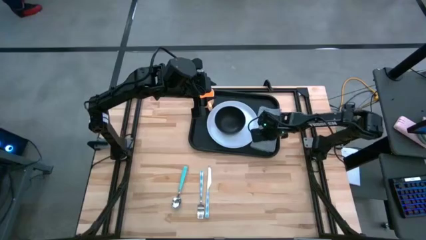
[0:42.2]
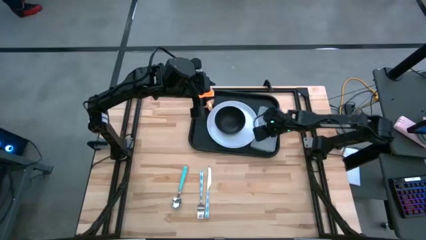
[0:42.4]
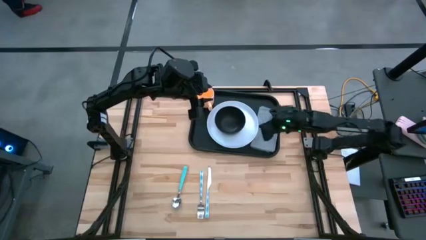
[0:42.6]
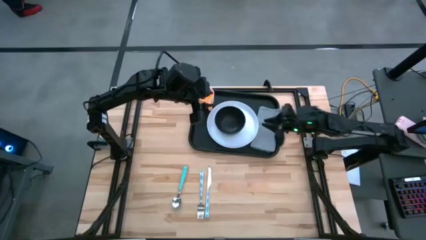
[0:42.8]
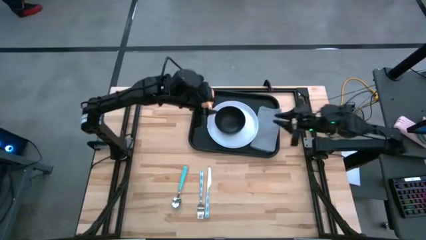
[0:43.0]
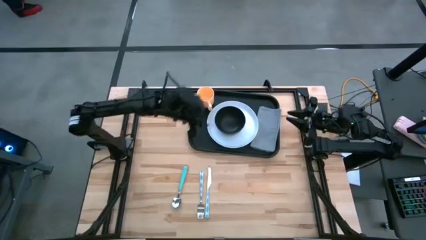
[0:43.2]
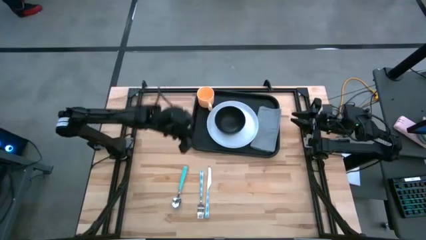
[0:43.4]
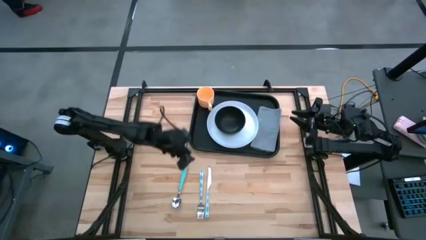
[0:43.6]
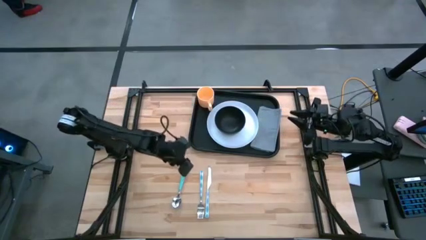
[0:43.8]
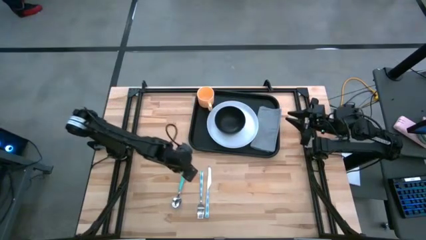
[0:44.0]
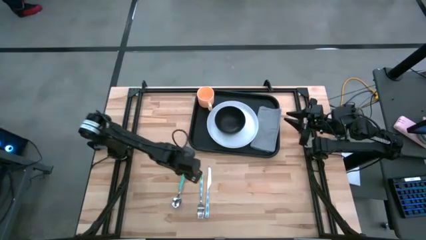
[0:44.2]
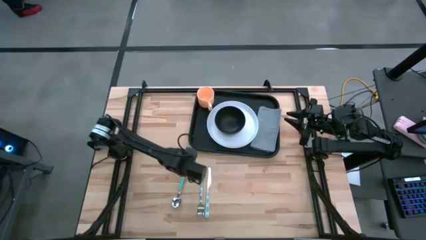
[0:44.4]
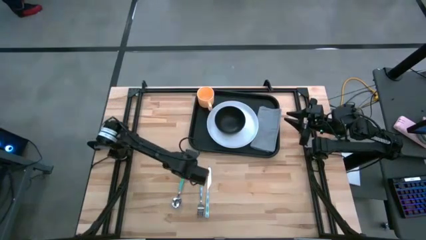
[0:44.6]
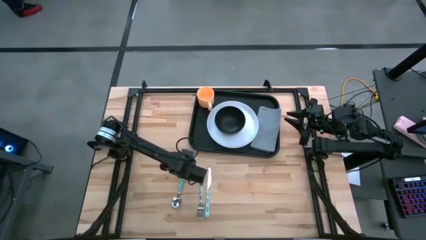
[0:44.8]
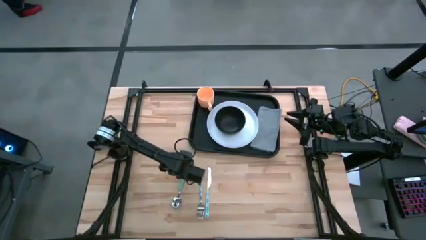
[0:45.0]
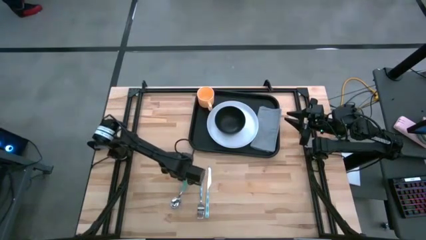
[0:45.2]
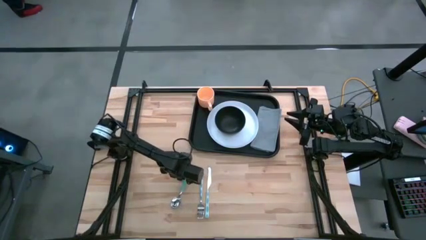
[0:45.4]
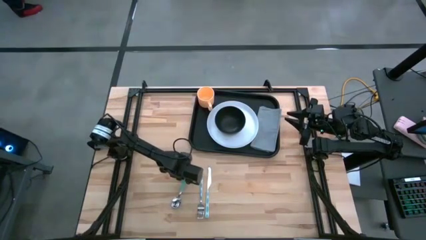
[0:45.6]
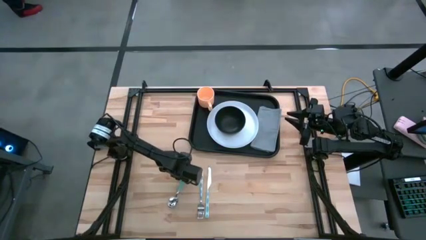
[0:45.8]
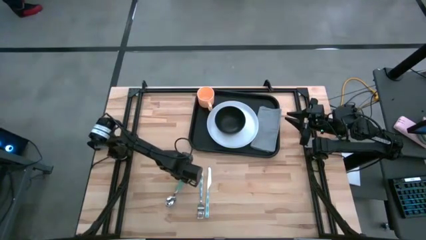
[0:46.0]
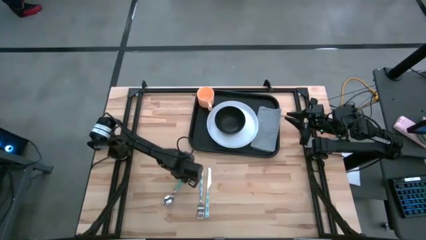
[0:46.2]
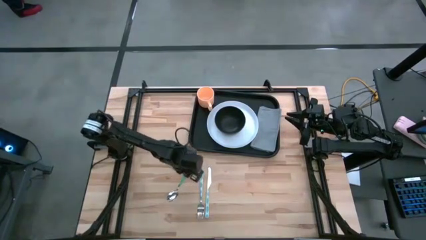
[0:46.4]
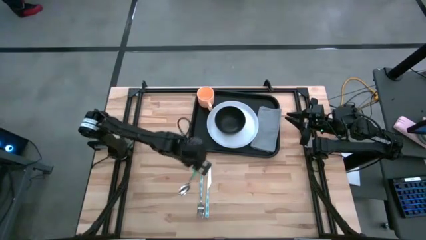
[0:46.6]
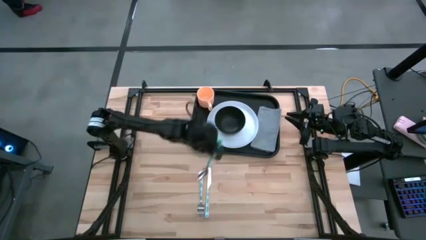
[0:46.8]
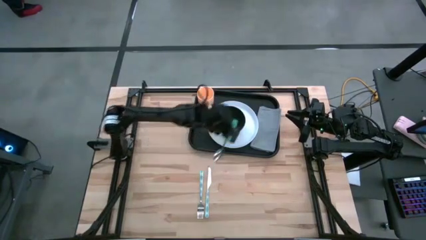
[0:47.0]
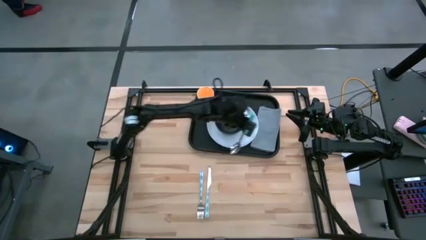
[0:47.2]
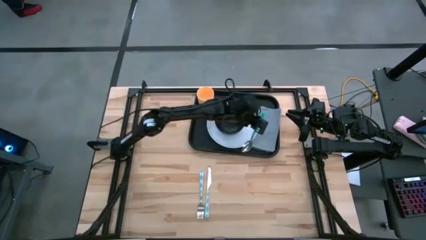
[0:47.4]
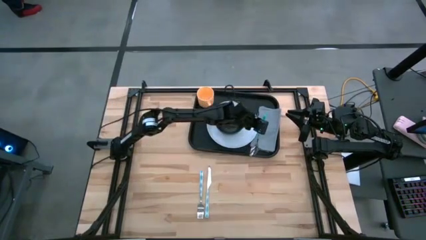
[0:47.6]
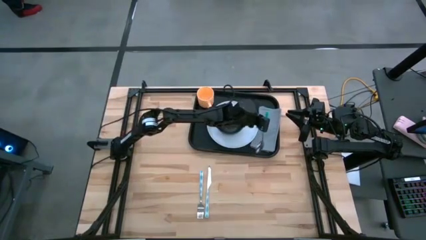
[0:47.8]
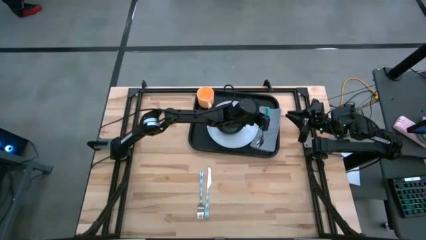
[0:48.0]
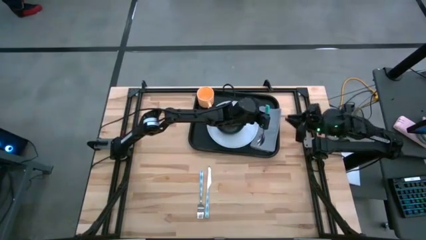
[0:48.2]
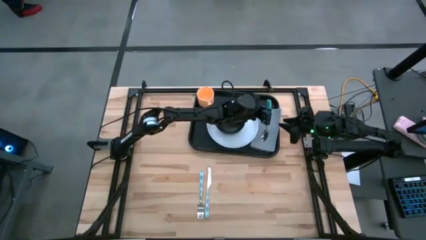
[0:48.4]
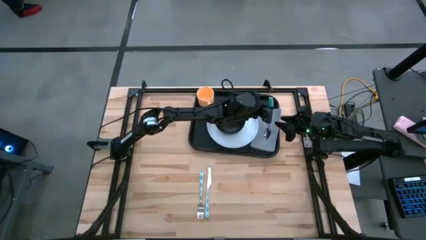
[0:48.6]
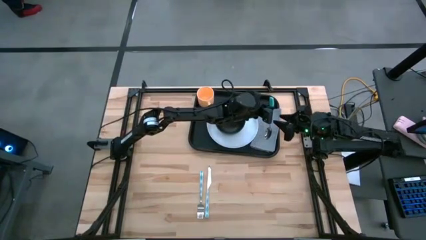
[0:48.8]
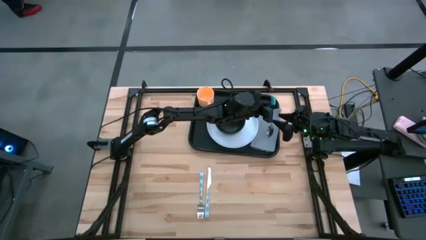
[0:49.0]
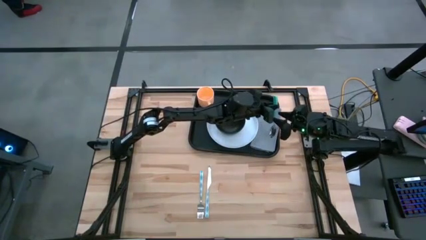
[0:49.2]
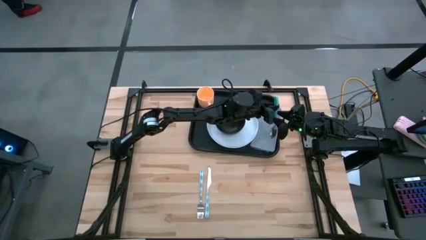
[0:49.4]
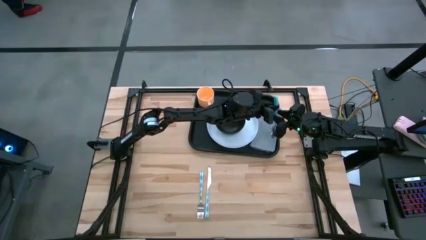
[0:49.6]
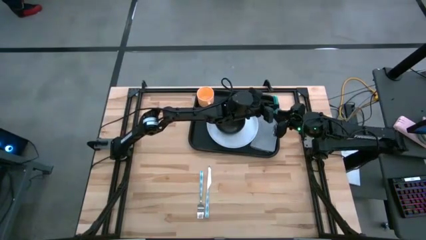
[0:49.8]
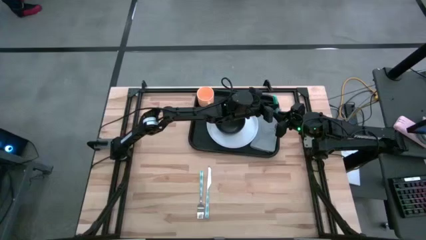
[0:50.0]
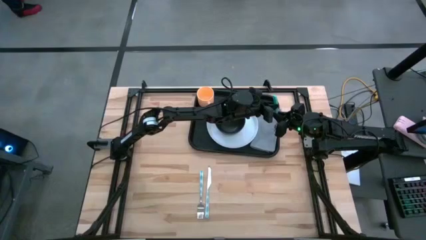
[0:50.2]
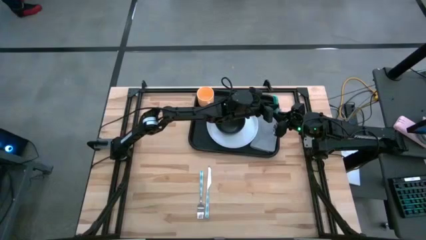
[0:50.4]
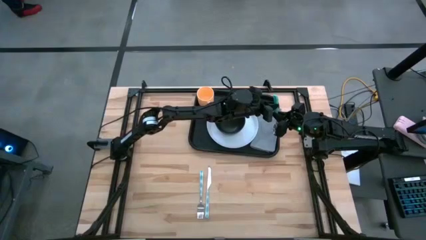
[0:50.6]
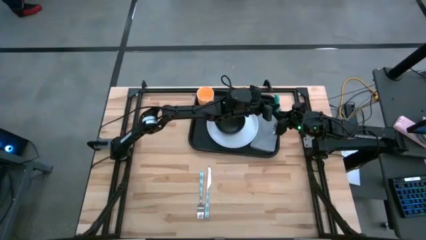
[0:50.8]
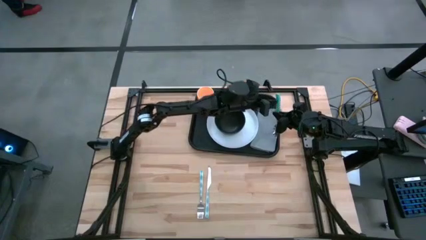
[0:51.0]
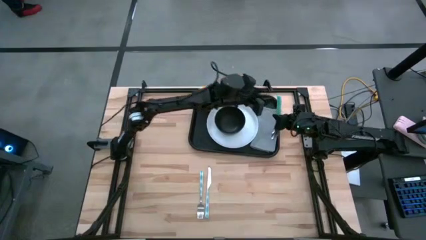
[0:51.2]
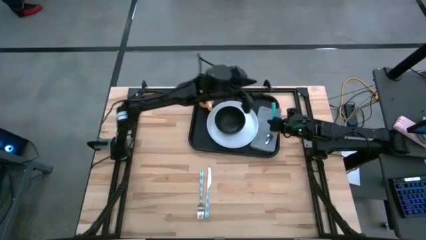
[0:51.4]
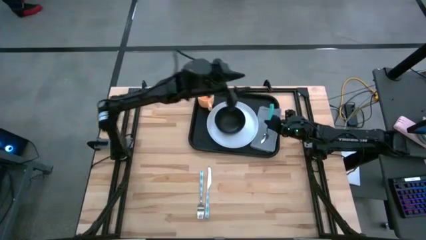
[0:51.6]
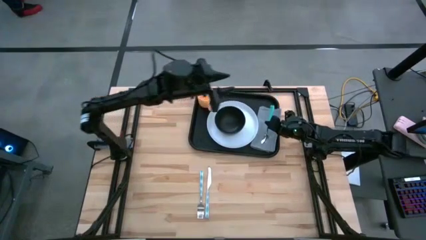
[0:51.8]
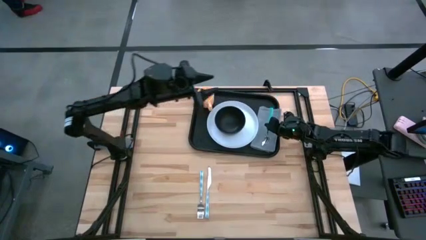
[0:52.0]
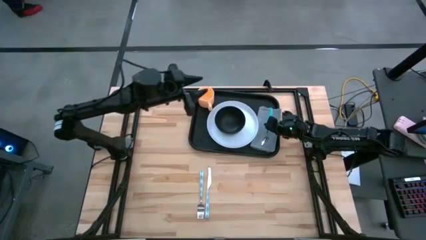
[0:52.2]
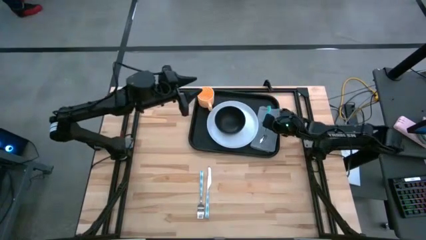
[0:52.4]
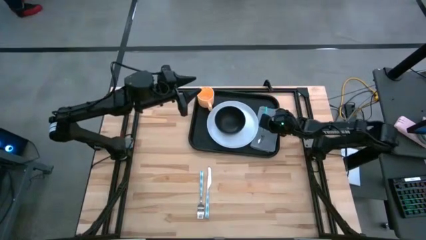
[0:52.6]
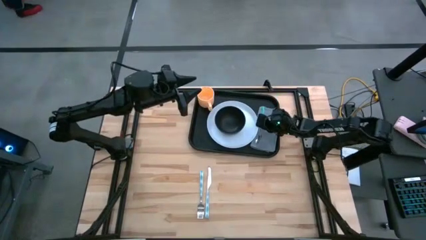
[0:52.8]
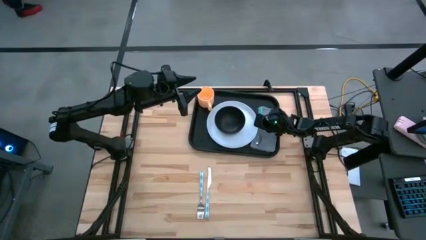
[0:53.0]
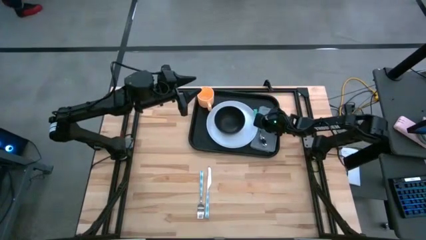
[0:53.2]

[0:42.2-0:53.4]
Task: Set up tray
Put the green spoon on the gray napkin on the black tray
